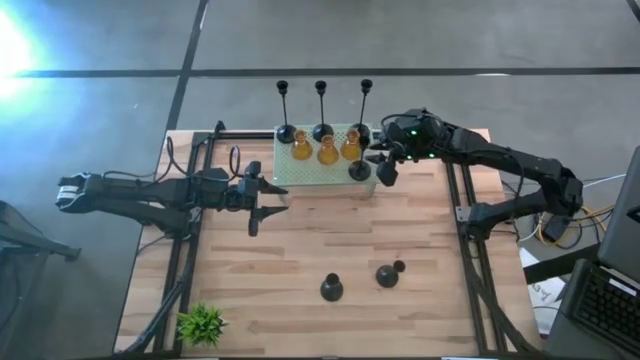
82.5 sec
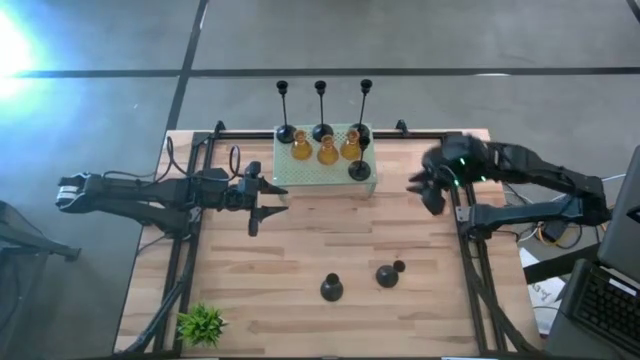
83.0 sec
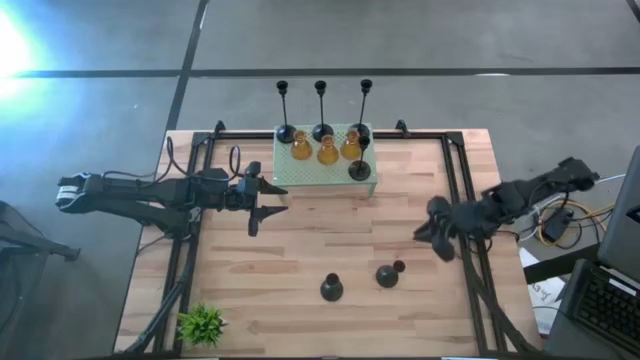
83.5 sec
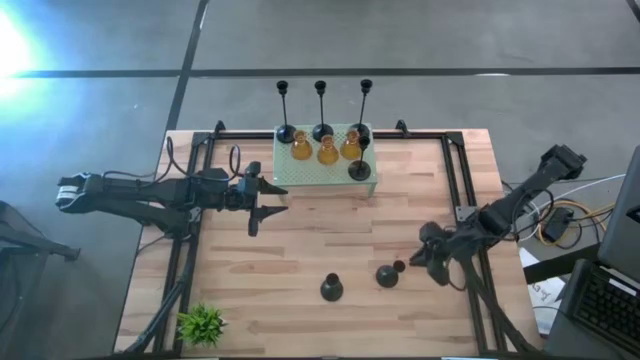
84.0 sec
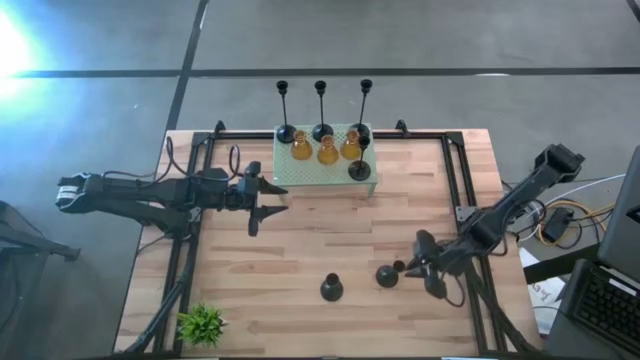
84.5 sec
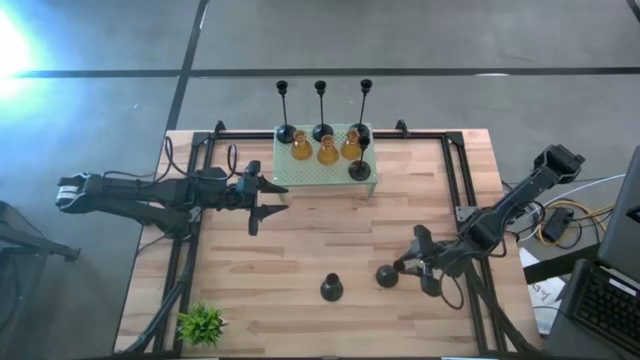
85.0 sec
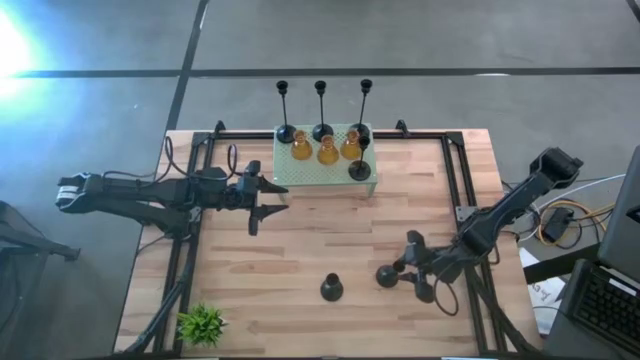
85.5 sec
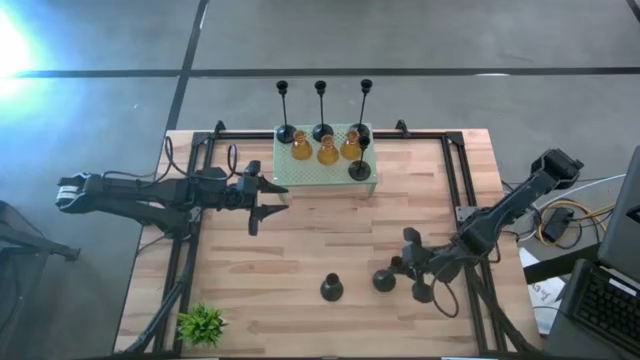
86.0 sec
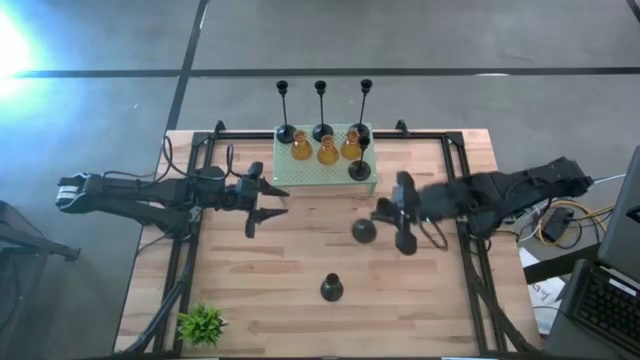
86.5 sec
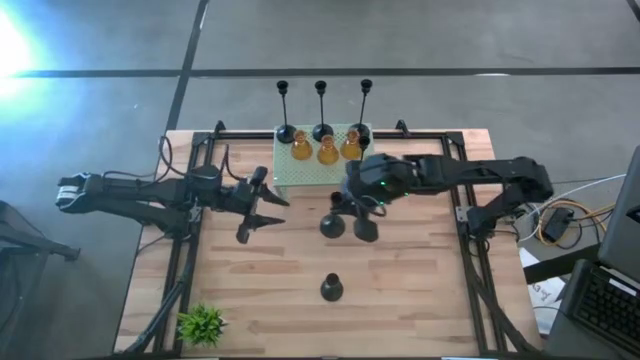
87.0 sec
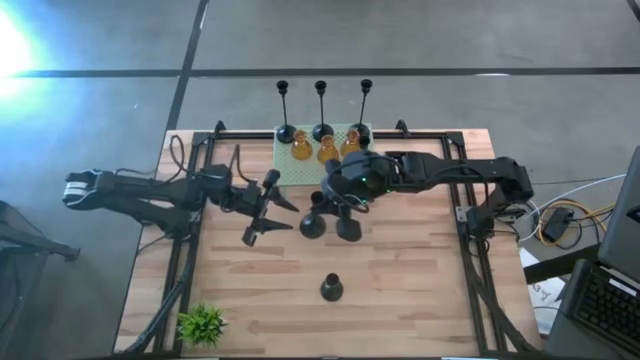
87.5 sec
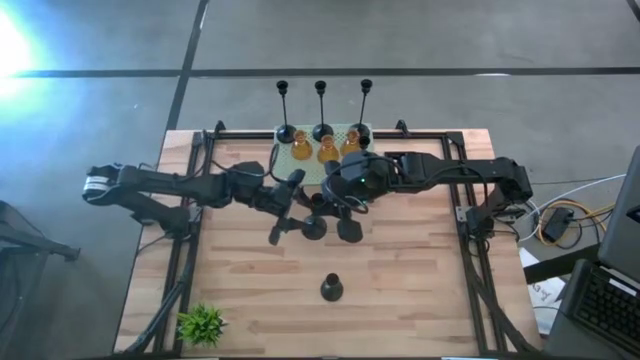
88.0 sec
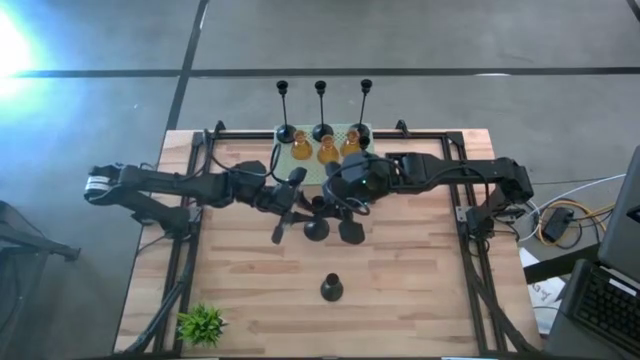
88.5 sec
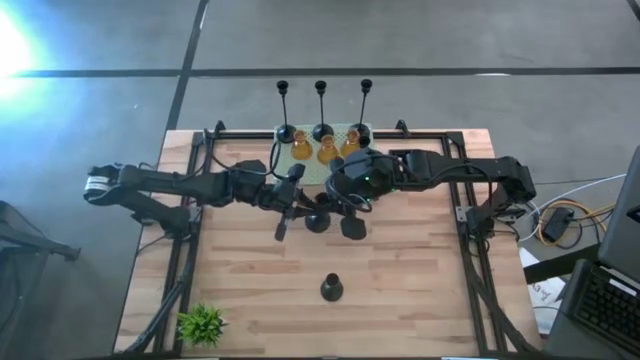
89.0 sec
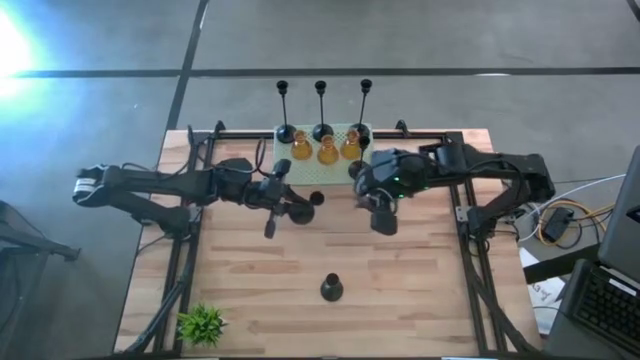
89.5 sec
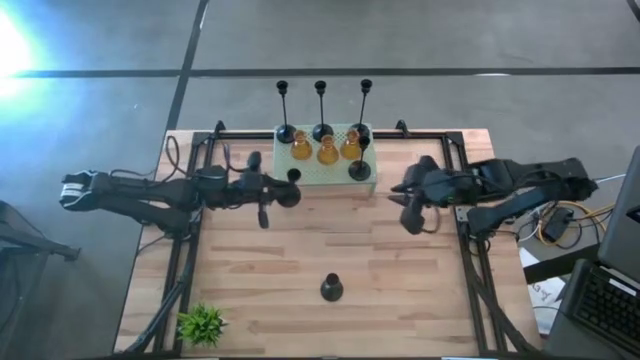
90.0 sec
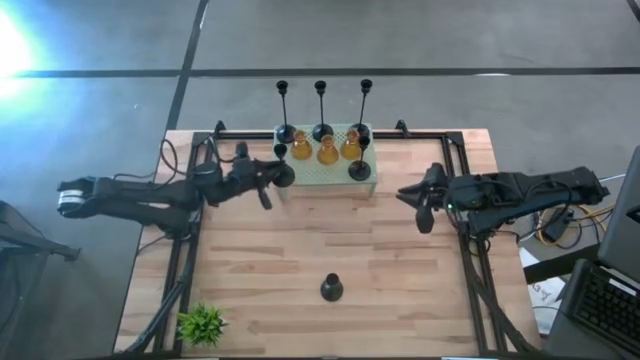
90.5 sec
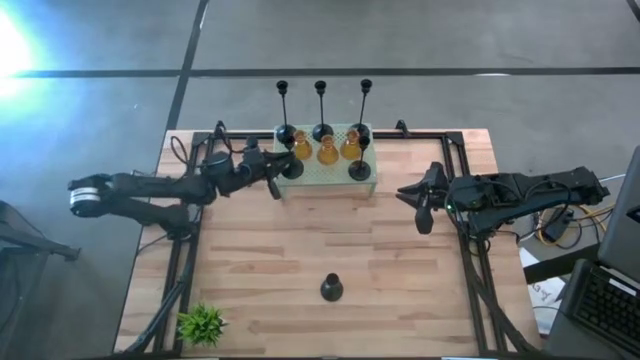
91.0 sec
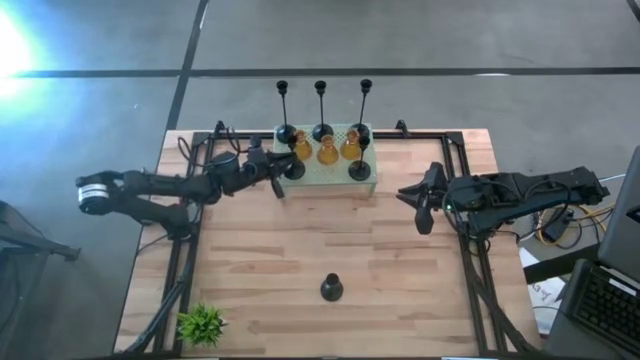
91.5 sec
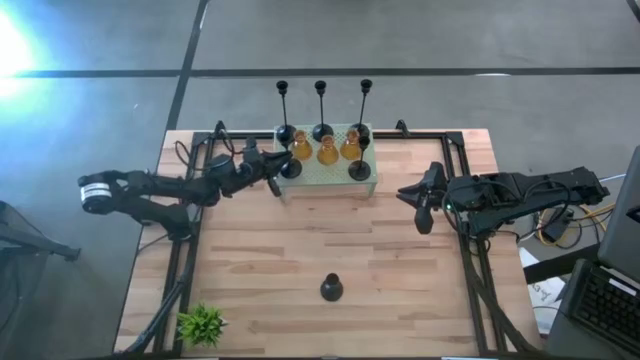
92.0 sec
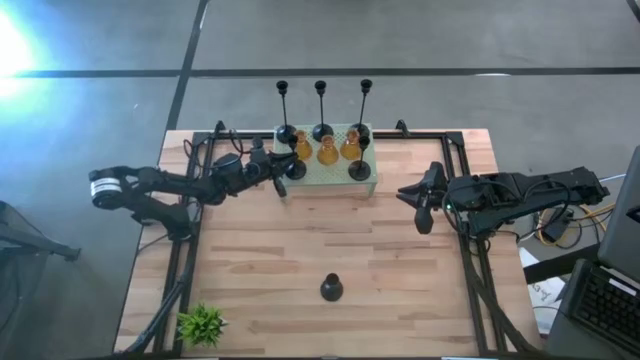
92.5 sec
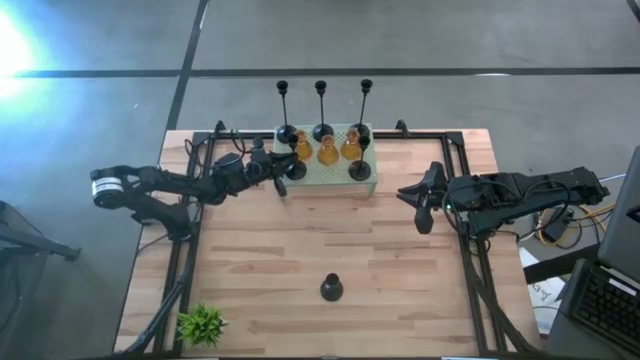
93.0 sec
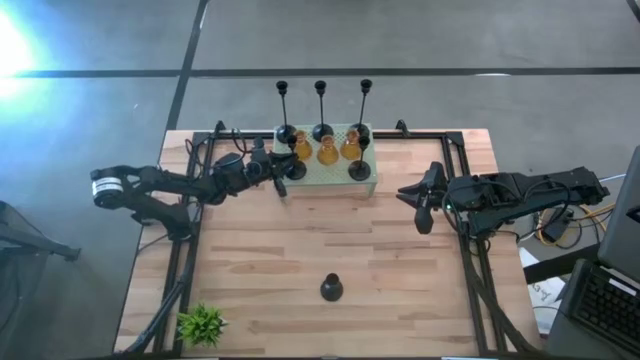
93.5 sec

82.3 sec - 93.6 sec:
Task: Pick & Place candle stick holders
Align the small black candle holder with the other small black candle holder on the shelf

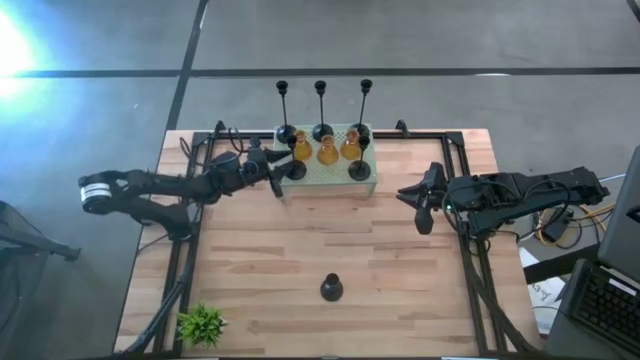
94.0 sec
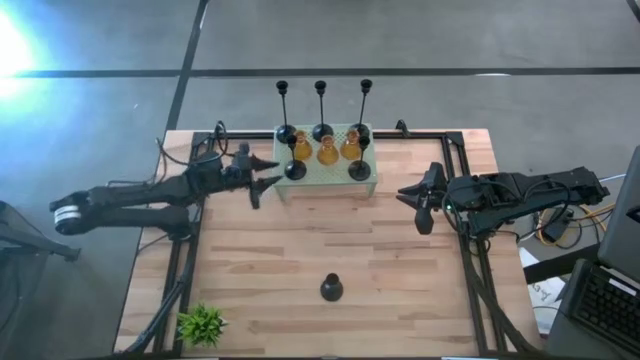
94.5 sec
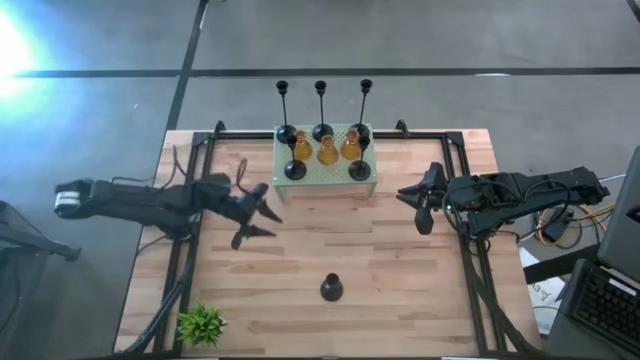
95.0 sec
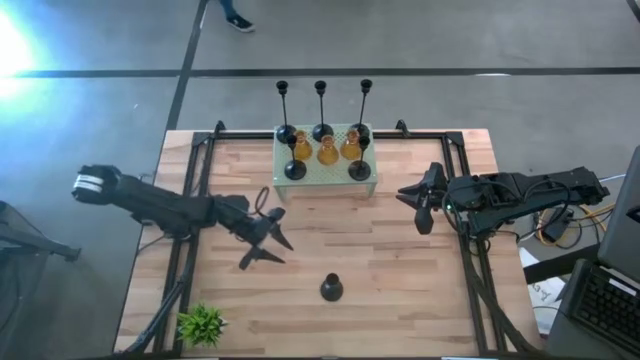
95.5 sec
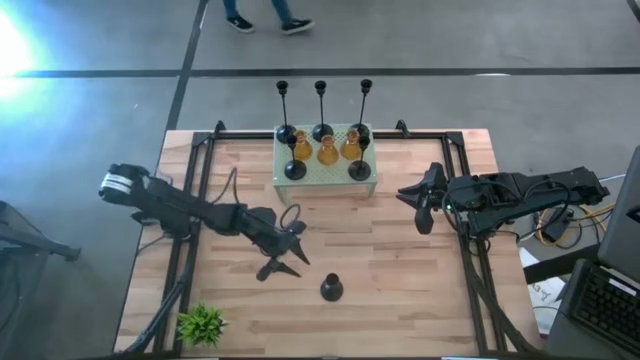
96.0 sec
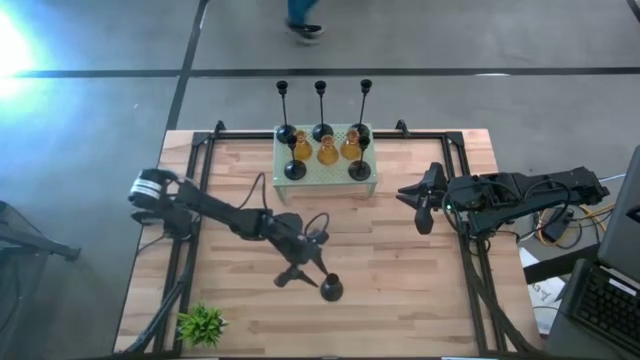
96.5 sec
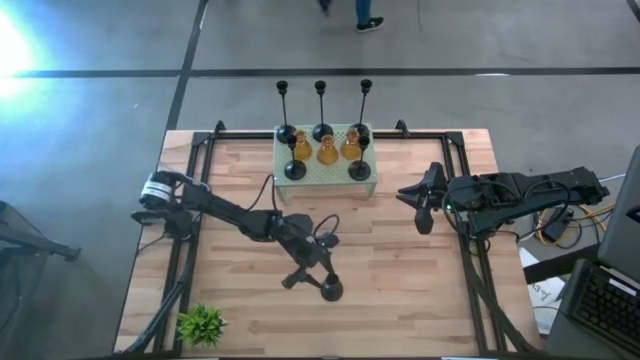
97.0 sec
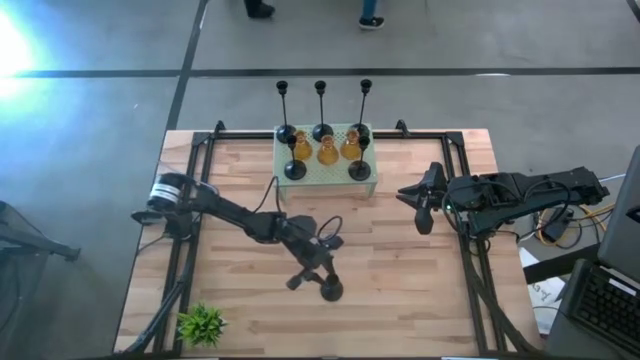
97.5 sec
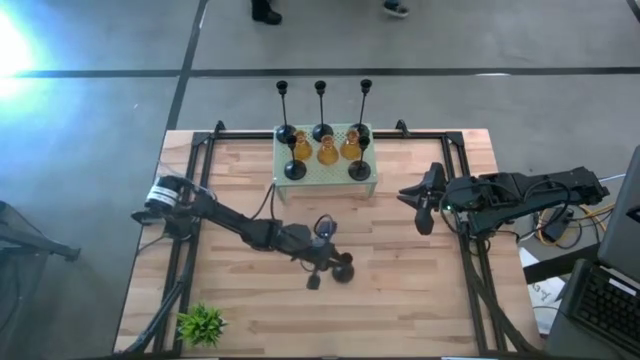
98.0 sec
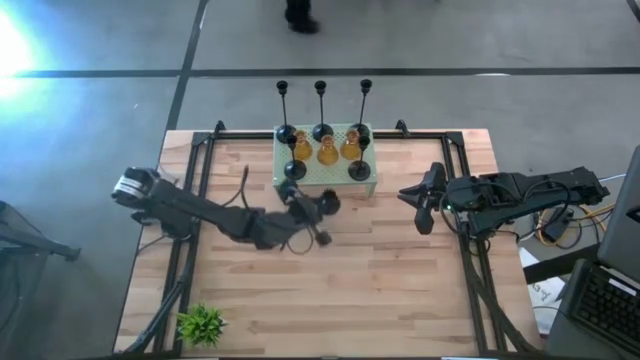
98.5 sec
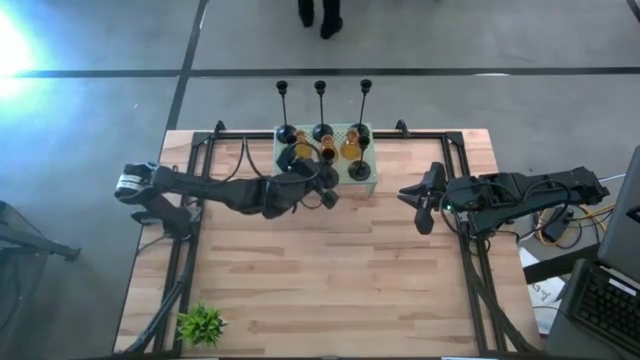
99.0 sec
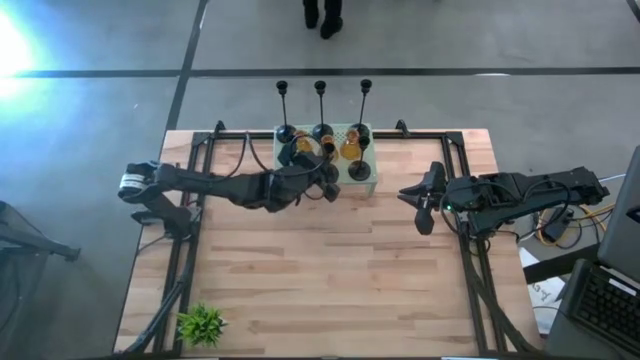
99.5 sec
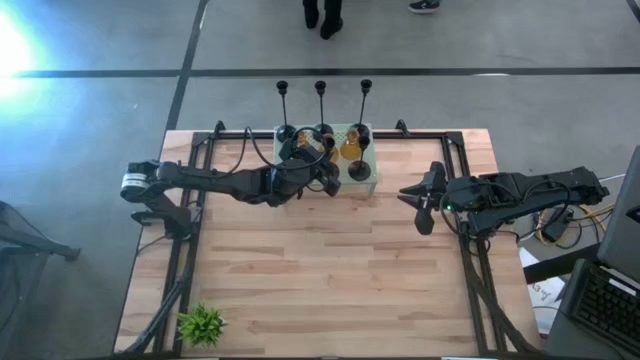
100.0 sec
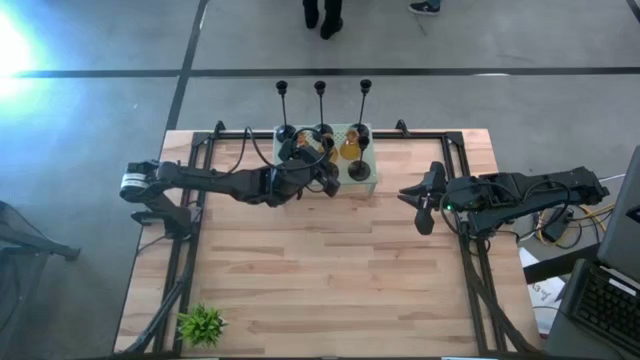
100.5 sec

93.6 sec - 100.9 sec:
Align the small black candle holder with the other small black candle holders on the shelf

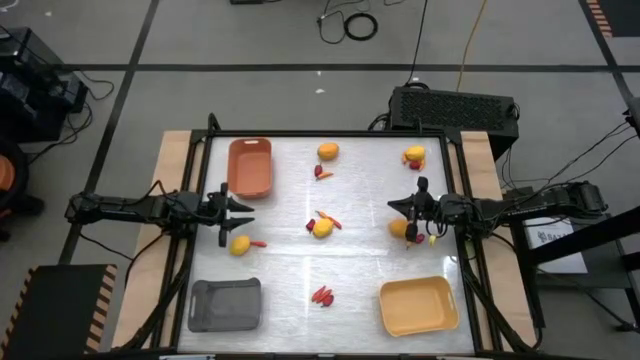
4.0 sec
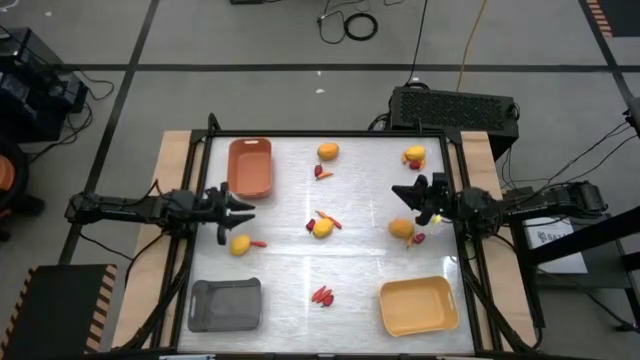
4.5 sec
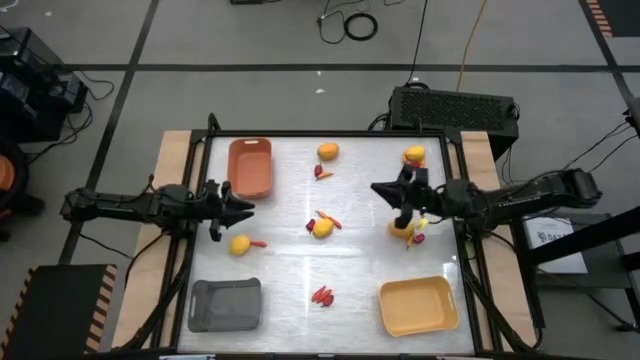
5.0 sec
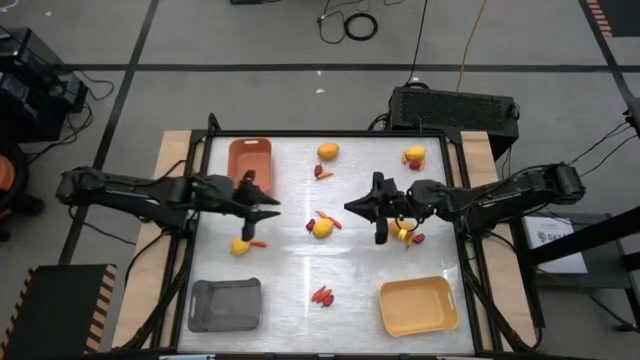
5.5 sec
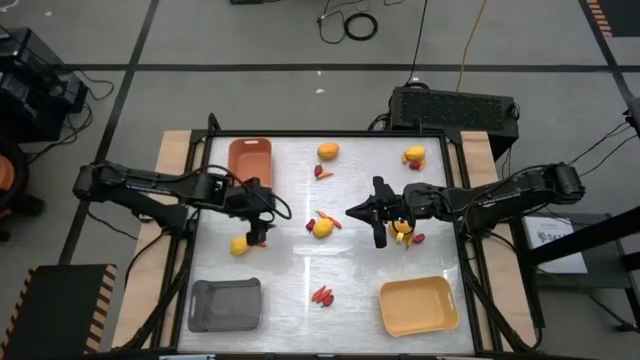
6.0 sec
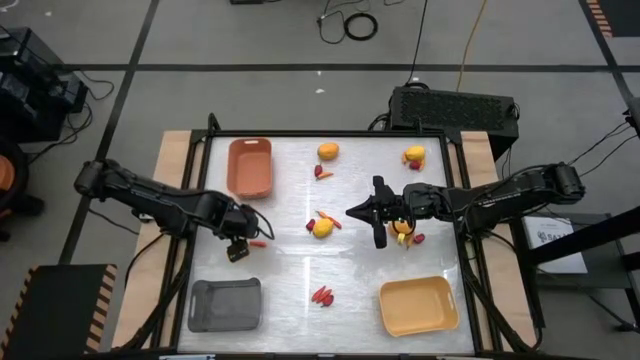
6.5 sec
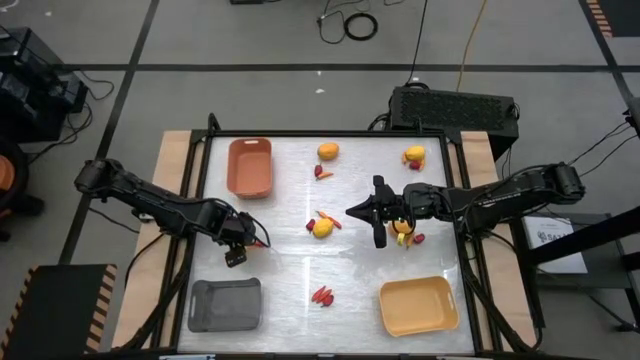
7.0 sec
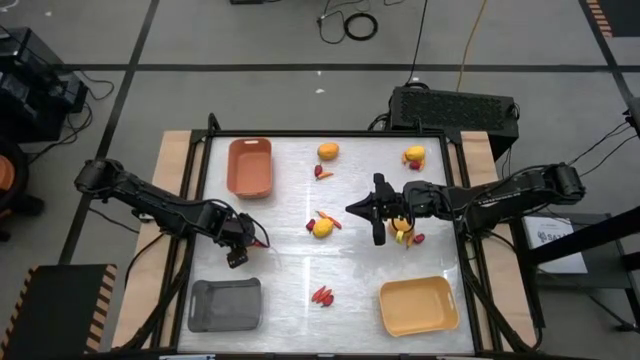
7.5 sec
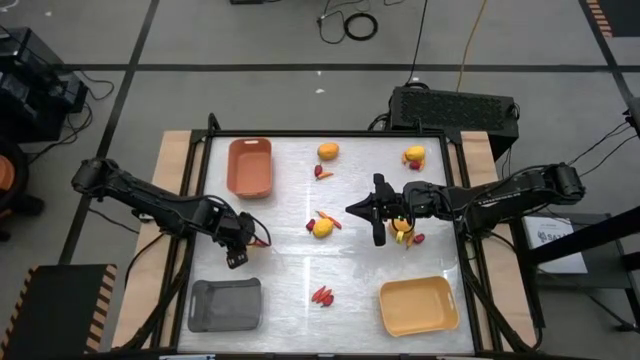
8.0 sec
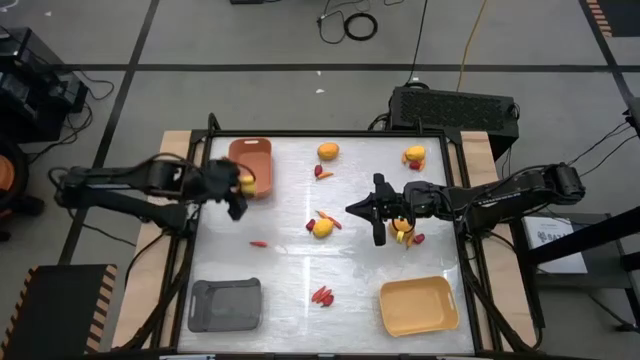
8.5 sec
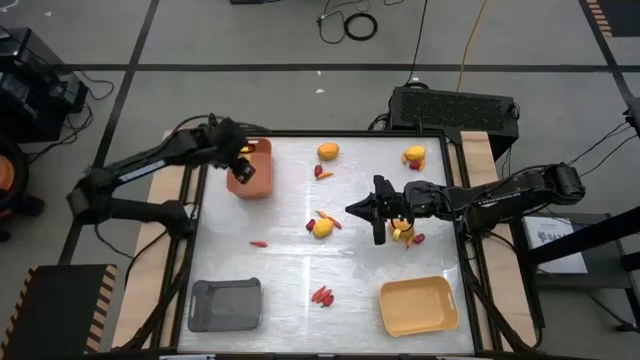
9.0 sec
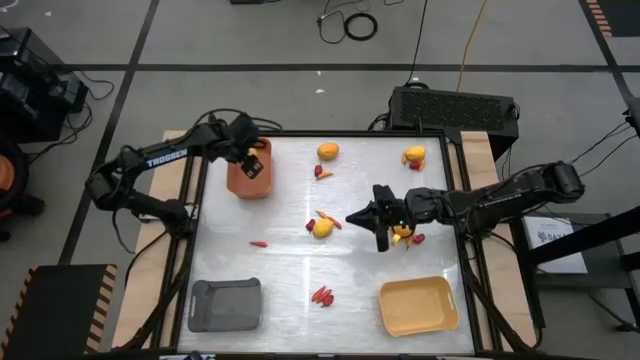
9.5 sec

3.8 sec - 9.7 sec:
Task: Sort produce into baskets
Put the lemon into the orange bin
